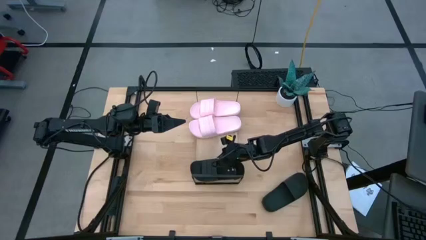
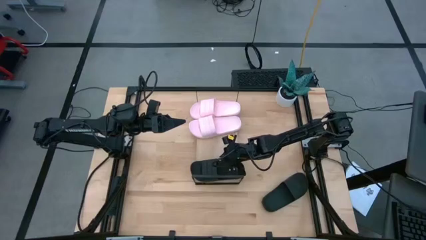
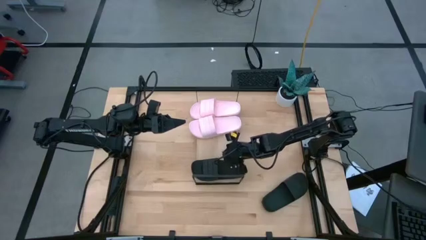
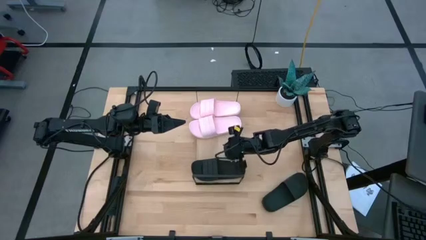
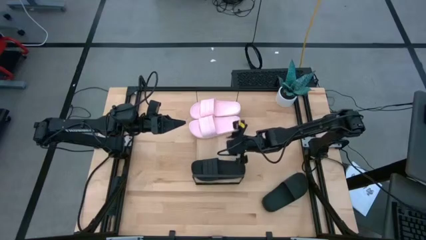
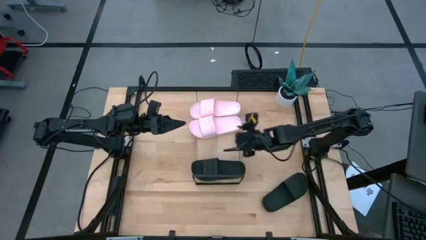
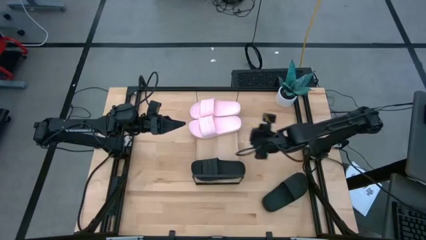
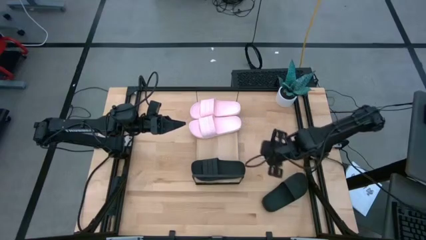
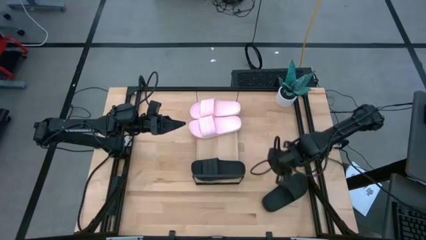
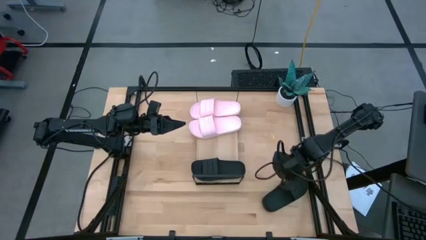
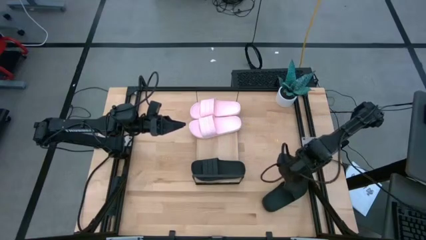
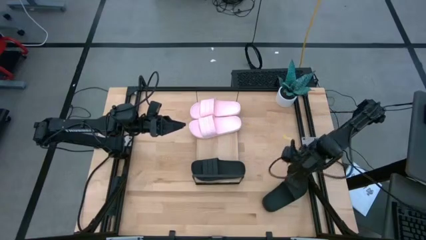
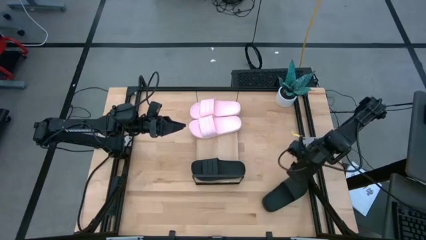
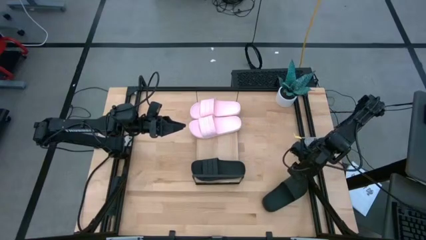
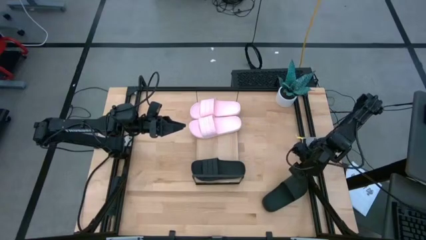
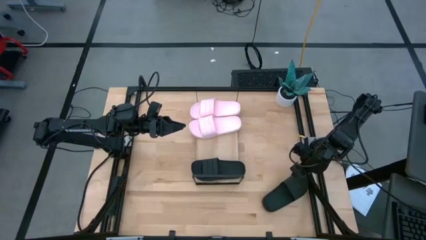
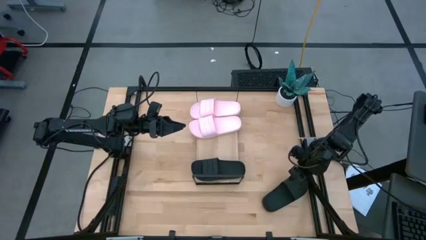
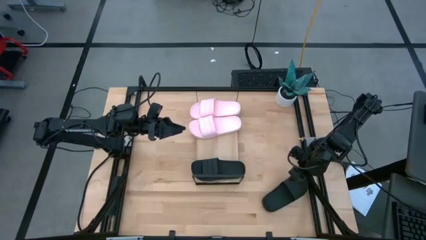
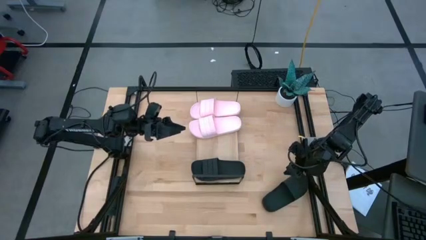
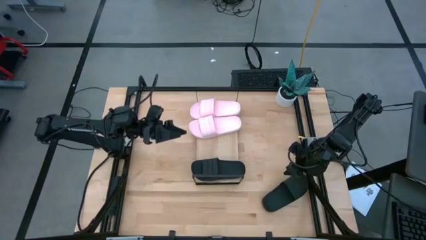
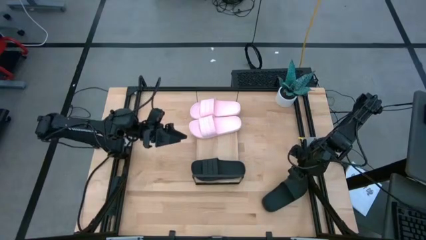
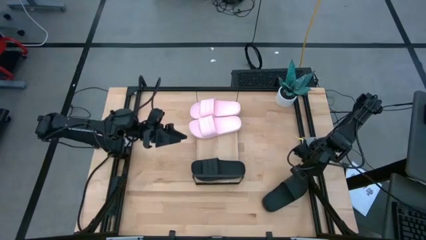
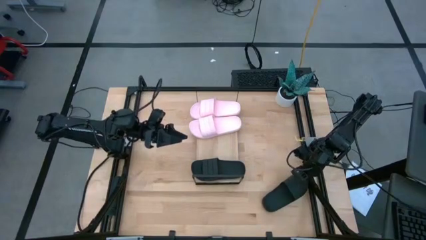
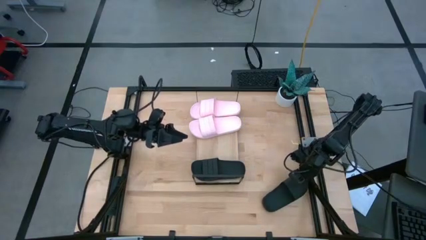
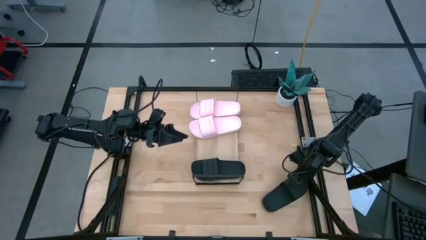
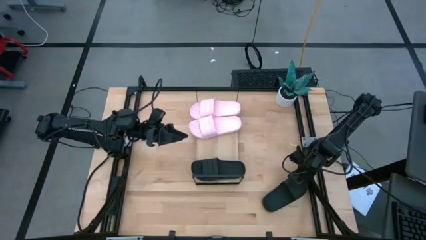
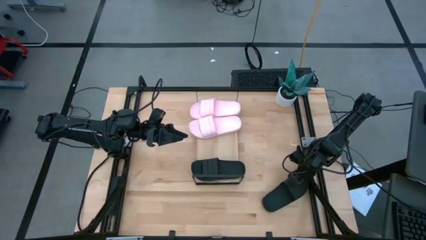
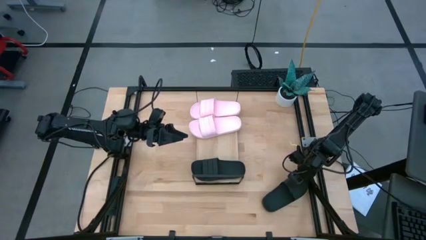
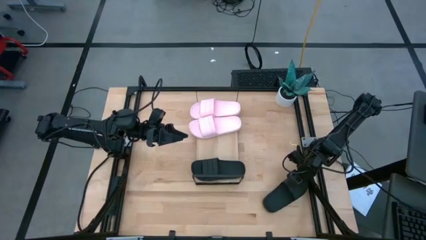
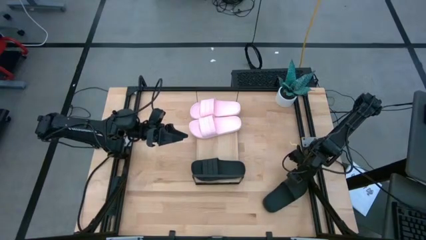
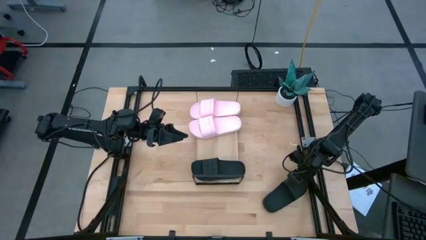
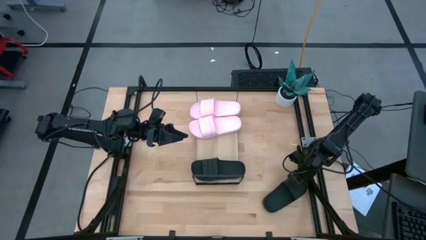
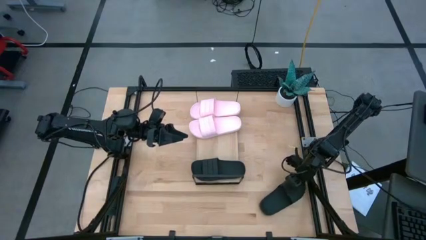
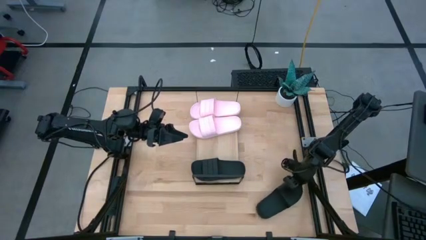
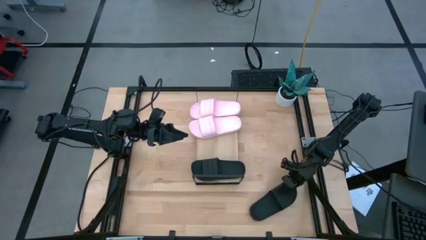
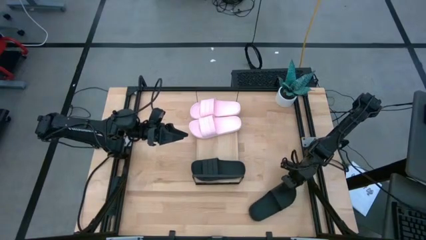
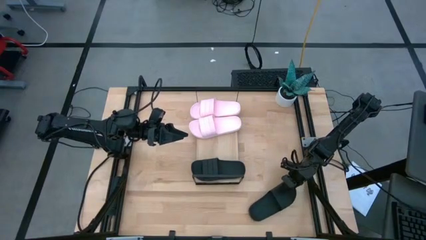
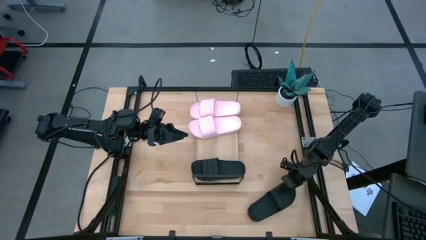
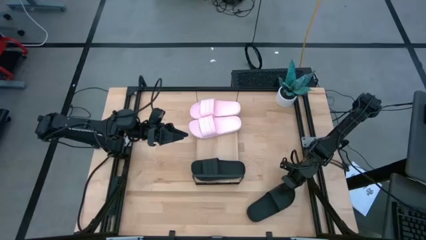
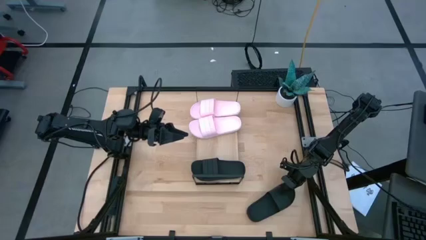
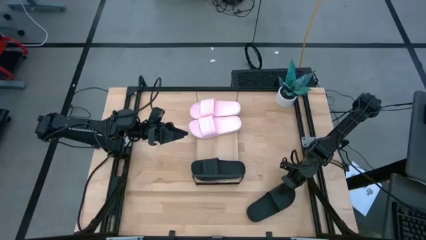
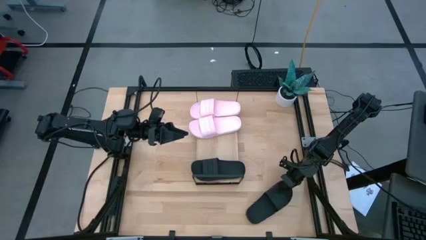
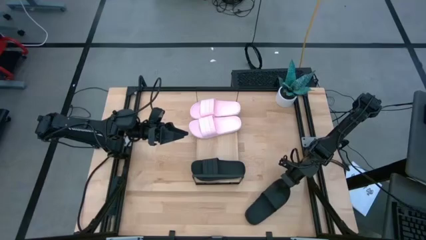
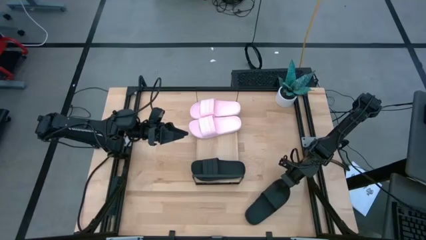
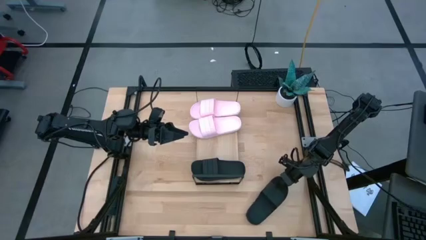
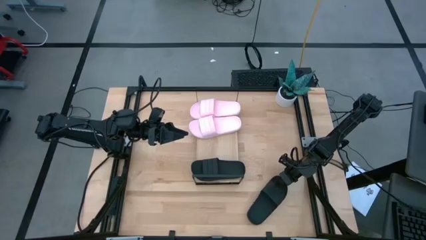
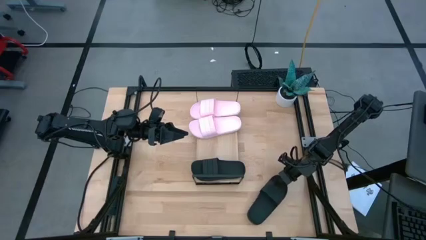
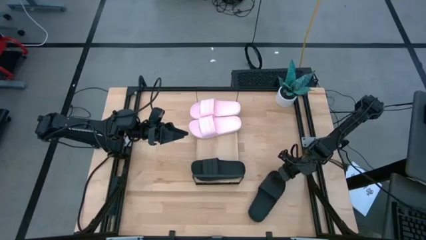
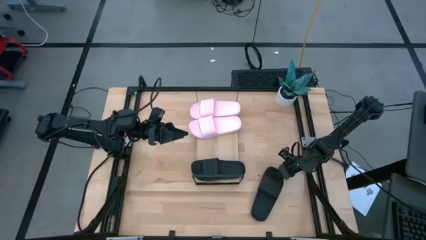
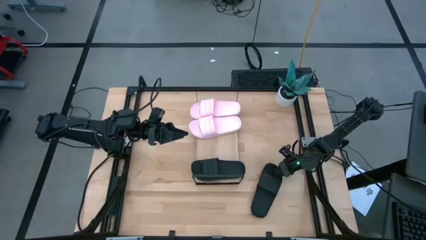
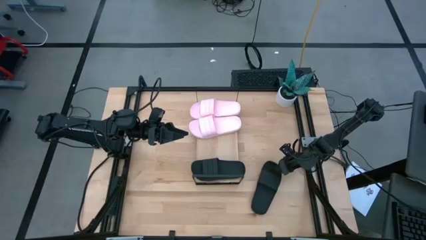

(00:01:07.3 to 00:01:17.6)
Task: Pick and place slides into the shelf
Put the black slide on the shelf
